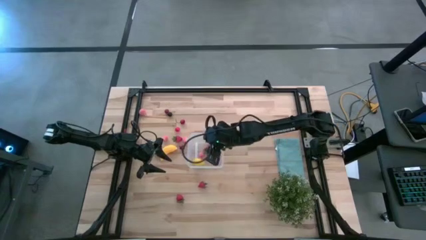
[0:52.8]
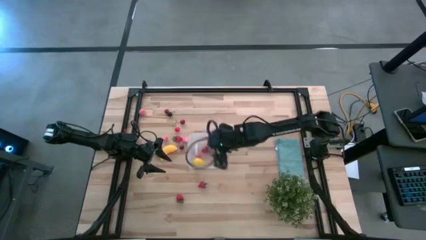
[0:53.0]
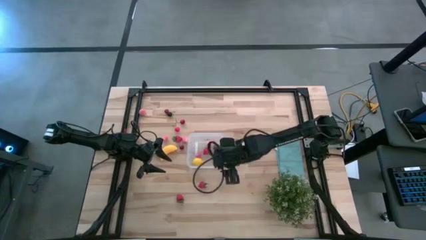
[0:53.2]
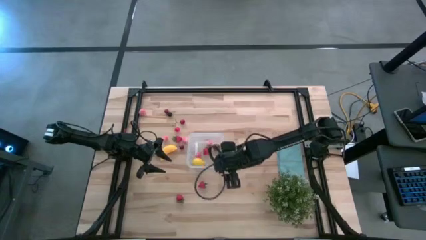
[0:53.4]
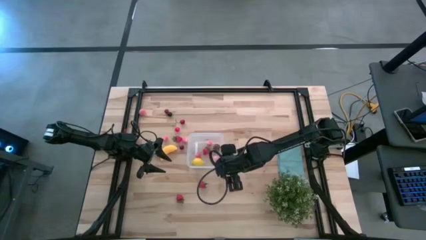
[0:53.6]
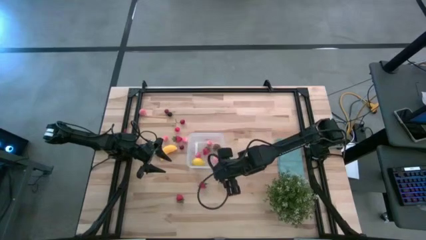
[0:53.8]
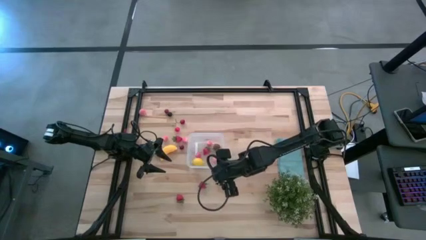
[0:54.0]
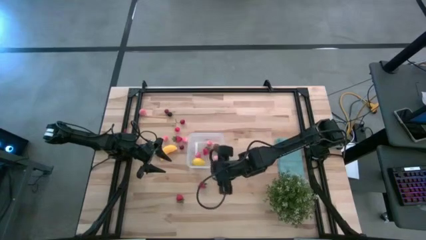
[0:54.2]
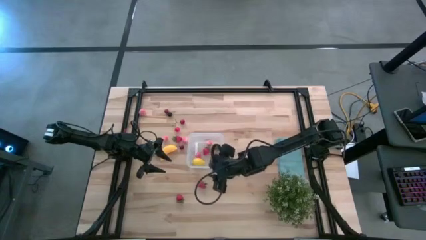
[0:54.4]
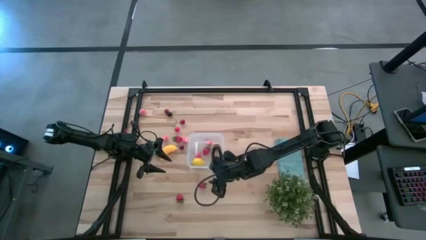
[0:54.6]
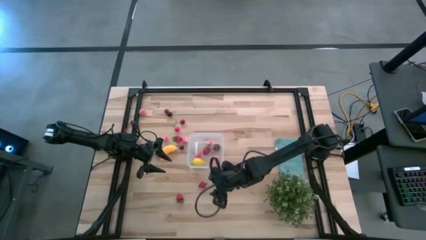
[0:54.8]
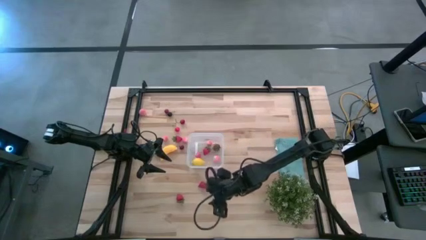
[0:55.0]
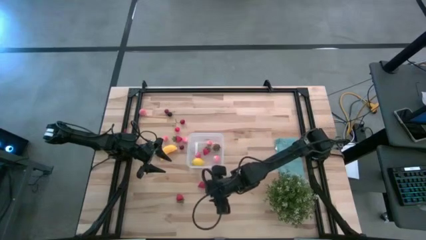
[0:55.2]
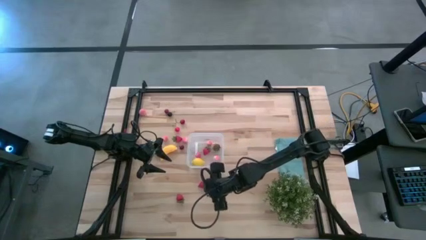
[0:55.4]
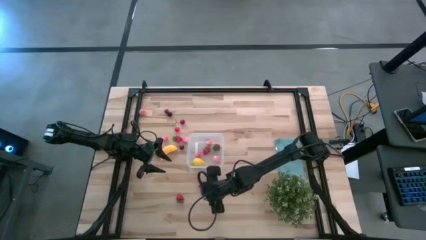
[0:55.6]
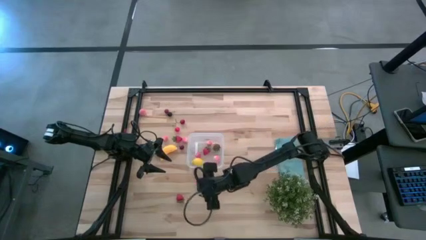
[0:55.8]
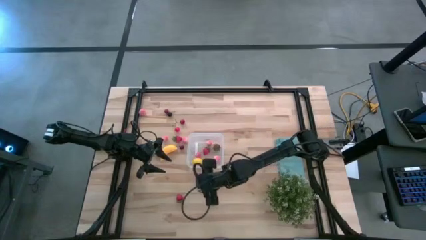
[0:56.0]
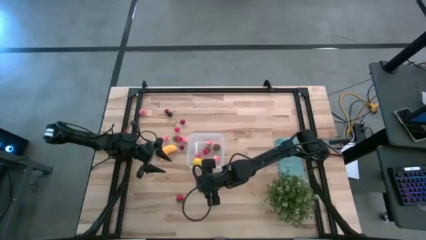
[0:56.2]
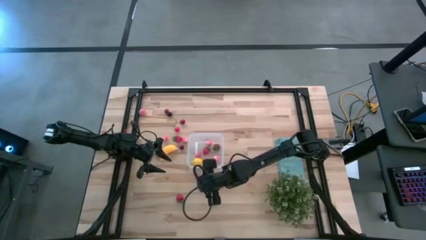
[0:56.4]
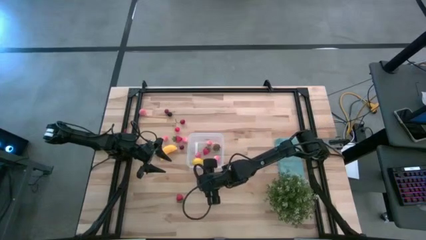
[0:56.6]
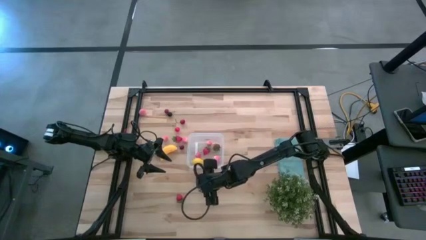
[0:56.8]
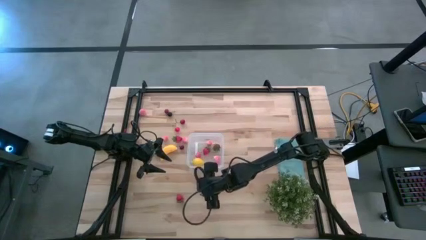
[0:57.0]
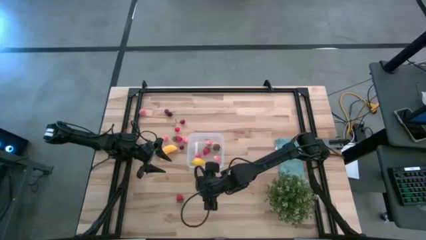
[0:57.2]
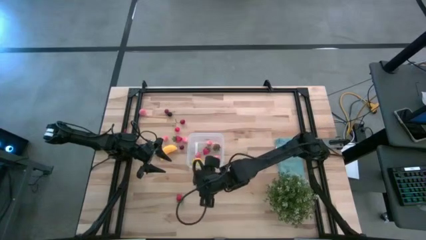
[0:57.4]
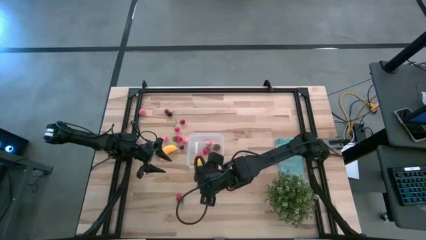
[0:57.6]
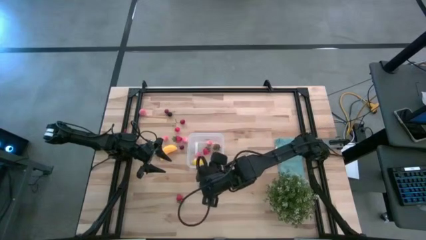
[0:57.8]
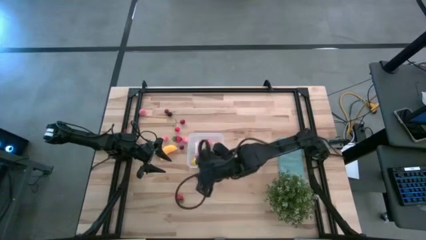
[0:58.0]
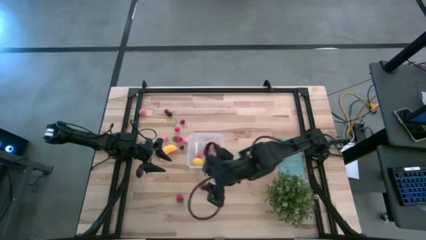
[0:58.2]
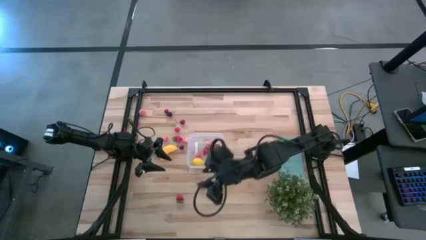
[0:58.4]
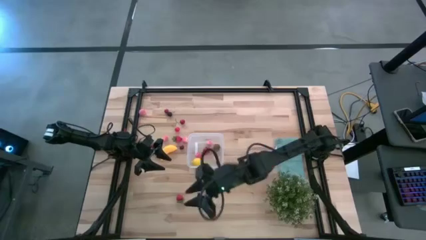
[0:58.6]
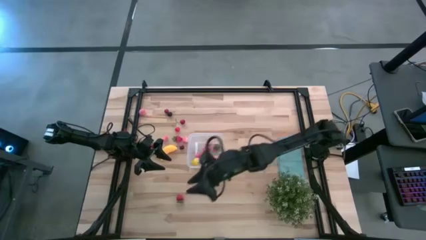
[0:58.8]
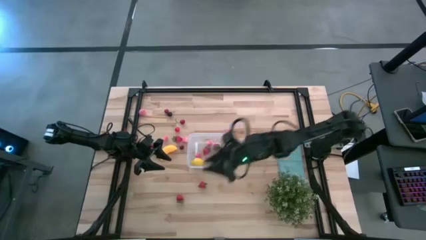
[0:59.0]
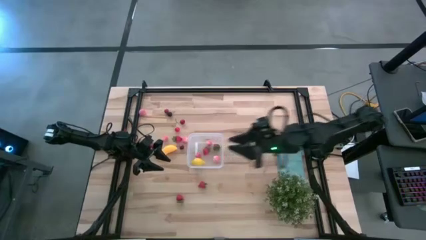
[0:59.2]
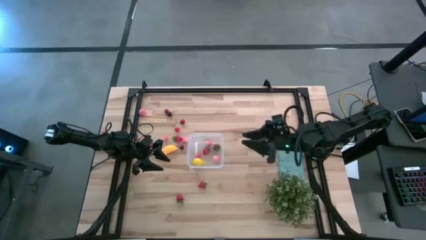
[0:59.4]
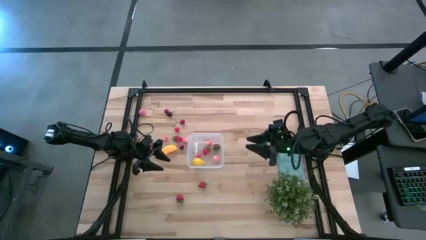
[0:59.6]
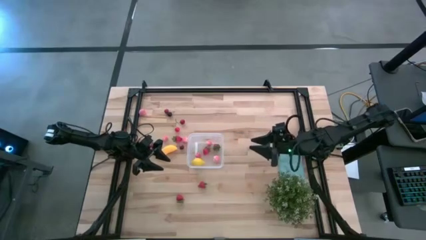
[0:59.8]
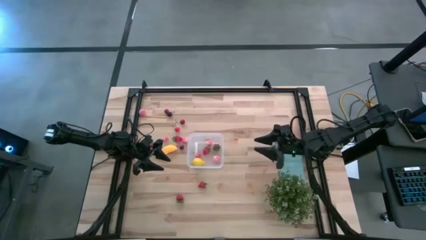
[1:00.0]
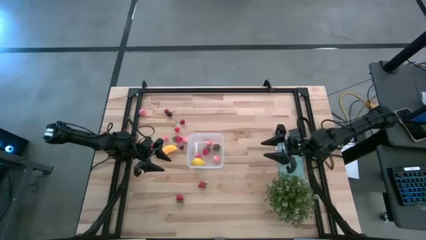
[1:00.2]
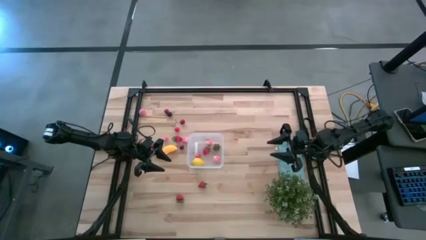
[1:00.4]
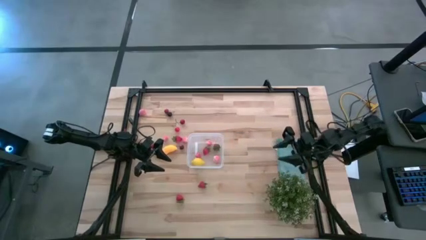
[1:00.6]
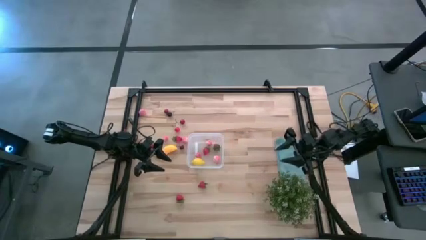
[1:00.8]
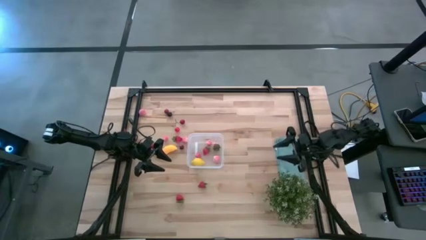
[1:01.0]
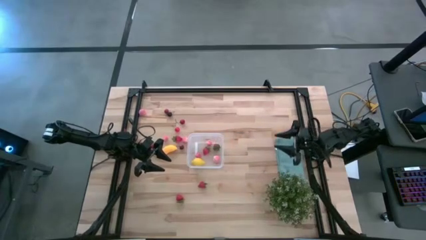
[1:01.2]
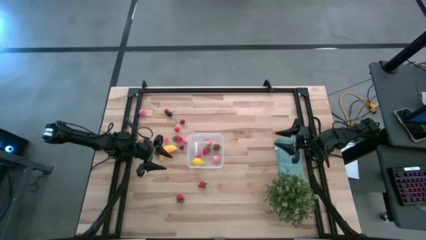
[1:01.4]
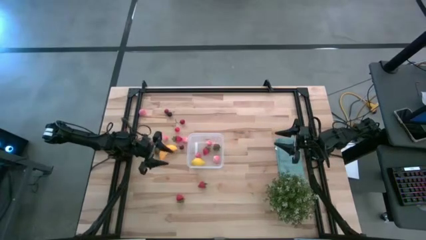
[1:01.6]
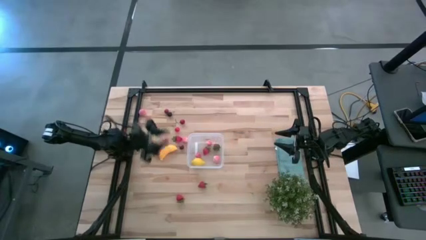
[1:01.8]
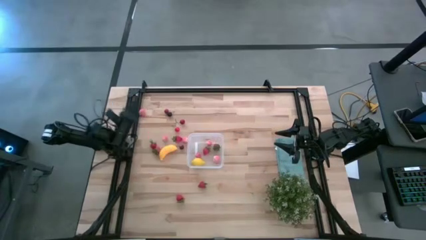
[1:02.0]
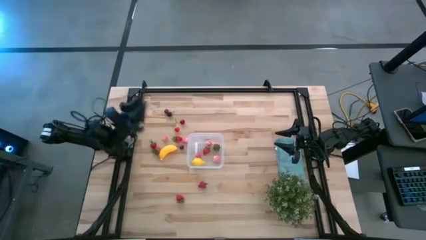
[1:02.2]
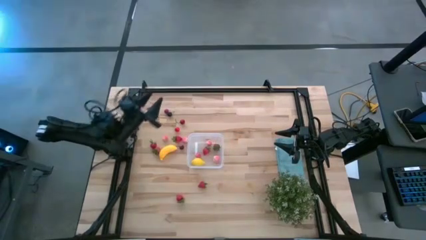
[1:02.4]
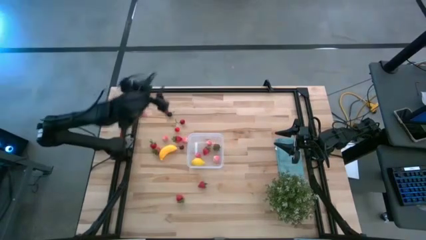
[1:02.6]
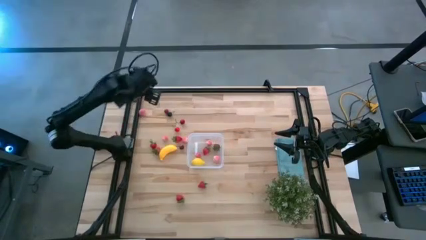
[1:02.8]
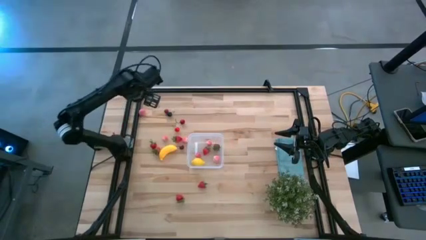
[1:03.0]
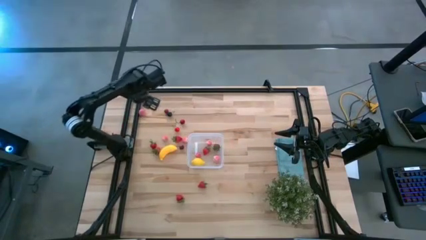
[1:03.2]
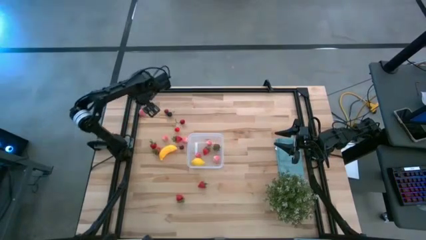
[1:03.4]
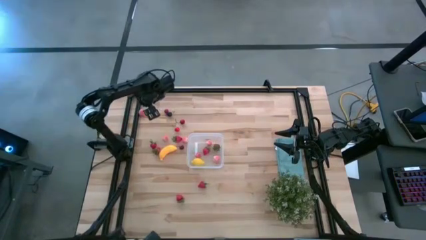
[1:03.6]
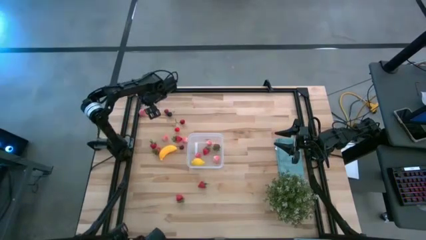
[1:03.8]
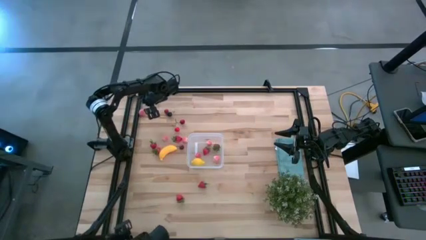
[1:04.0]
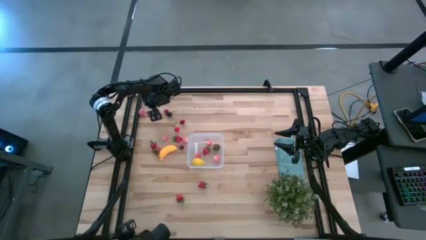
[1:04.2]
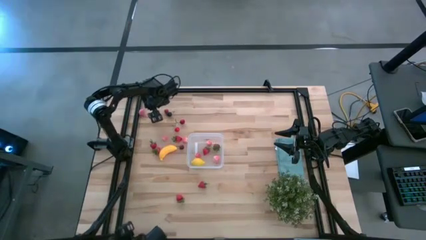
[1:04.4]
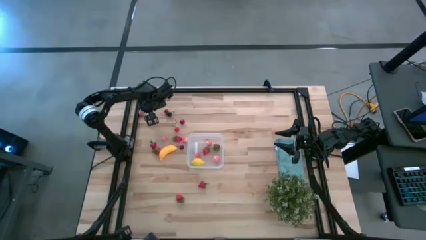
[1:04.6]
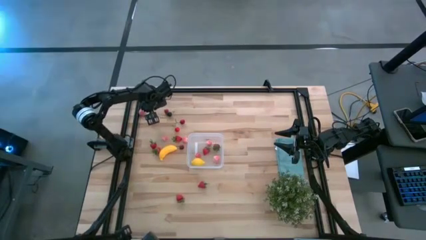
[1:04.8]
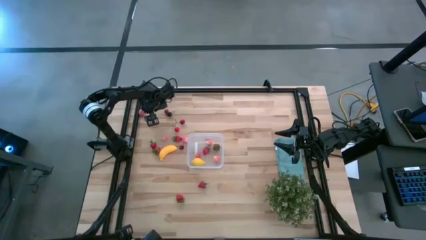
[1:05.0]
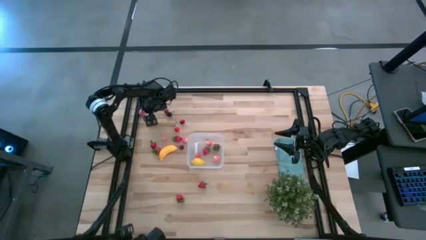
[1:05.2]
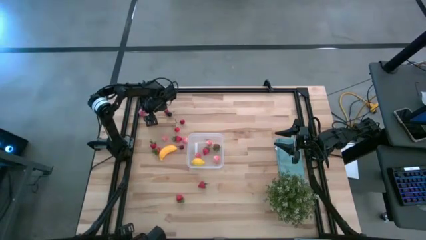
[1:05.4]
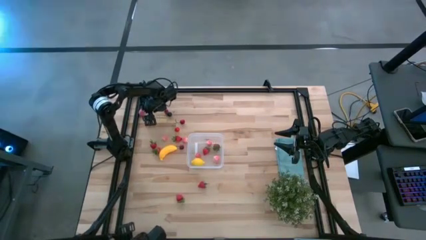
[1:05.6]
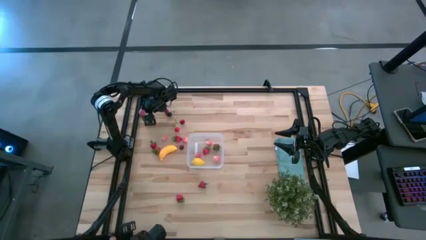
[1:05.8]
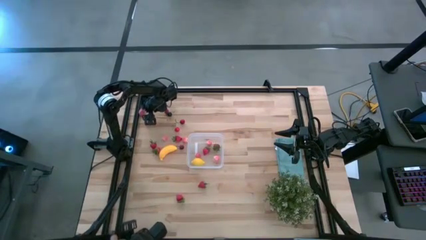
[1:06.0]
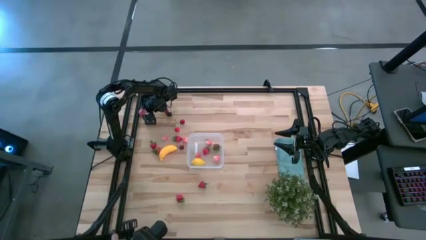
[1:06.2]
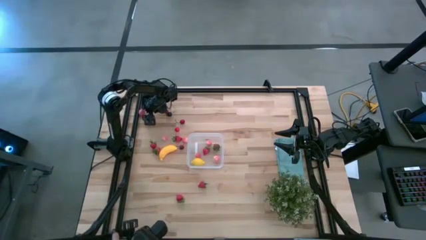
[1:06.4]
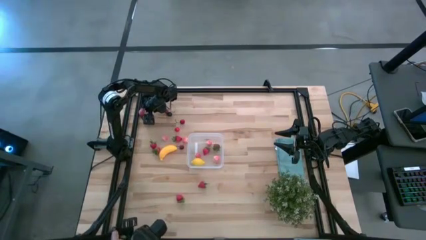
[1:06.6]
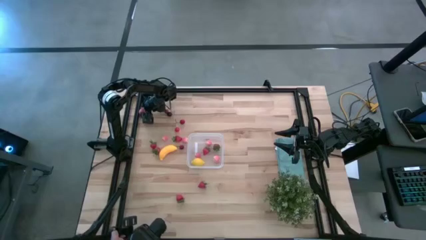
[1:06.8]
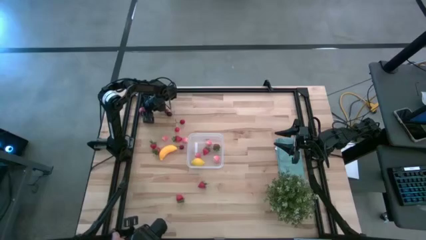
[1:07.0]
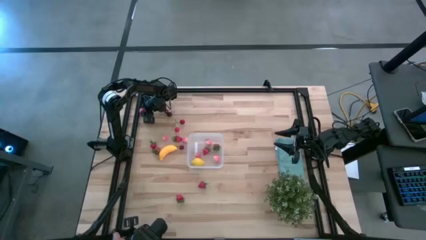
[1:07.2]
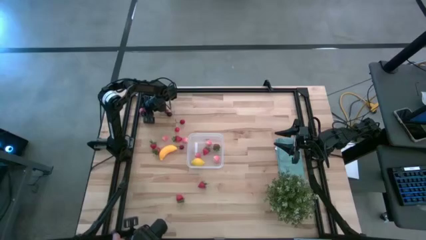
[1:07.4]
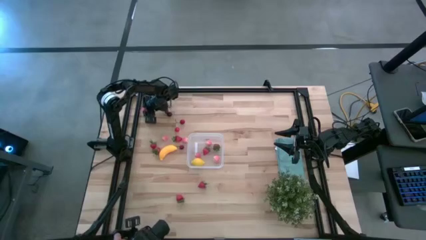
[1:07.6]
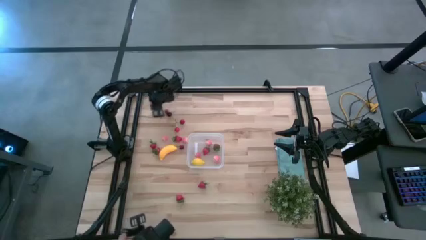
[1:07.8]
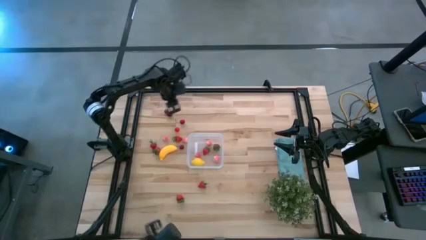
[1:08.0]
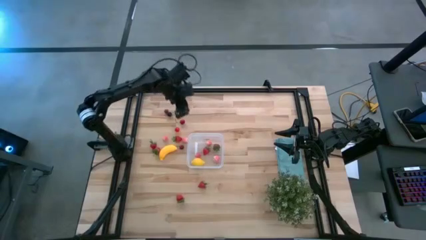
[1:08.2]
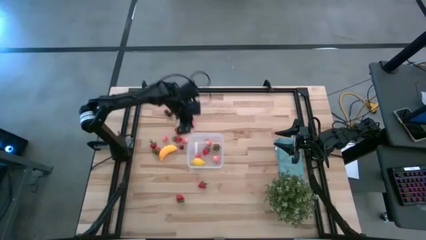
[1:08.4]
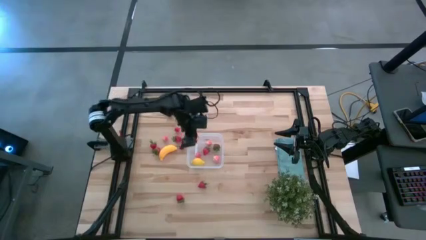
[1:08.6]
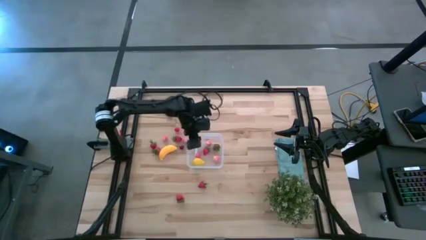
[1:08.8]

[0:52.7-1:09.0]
Task: Pick and placing Produce into tupperware
Put the peach into the transparent bin
